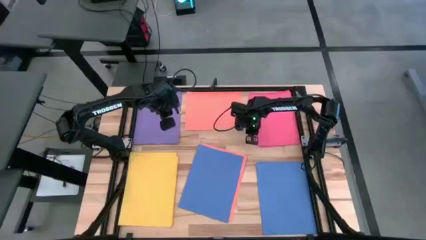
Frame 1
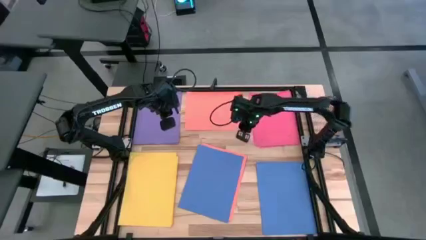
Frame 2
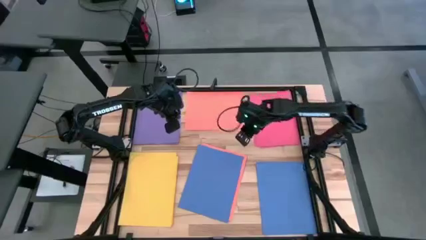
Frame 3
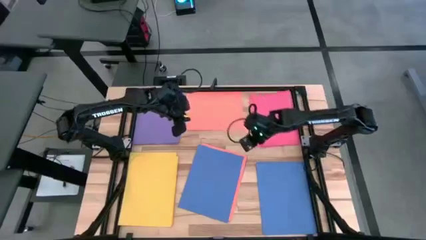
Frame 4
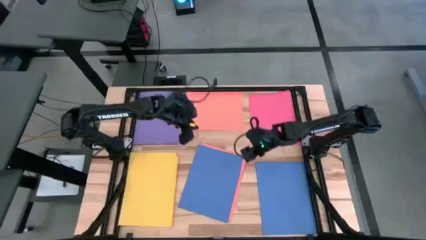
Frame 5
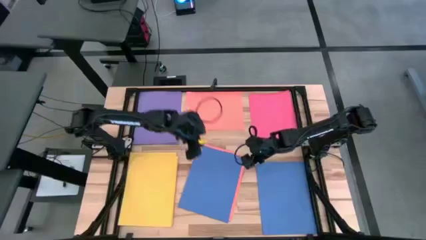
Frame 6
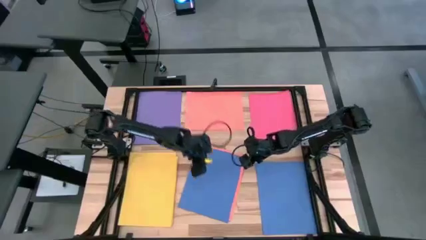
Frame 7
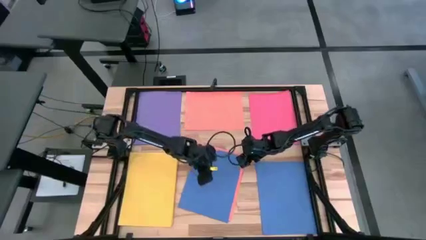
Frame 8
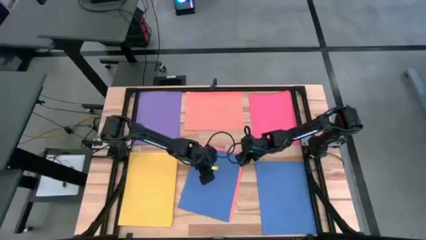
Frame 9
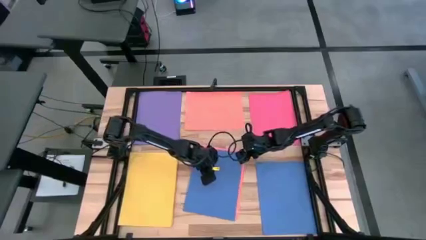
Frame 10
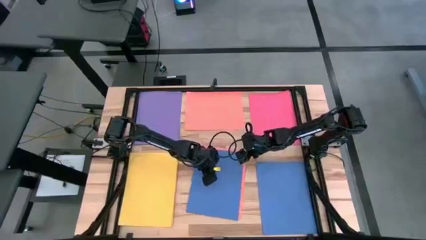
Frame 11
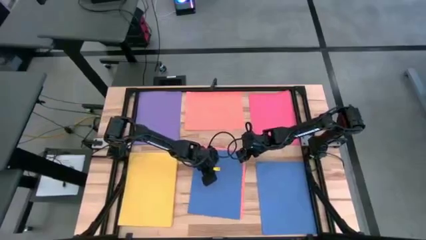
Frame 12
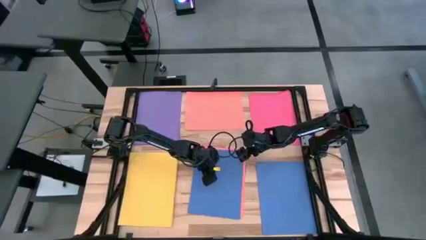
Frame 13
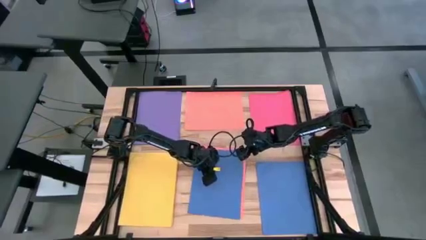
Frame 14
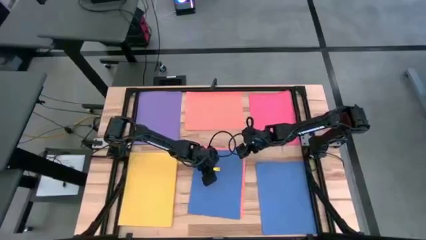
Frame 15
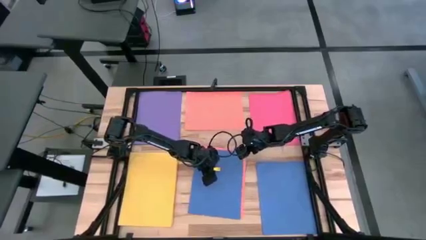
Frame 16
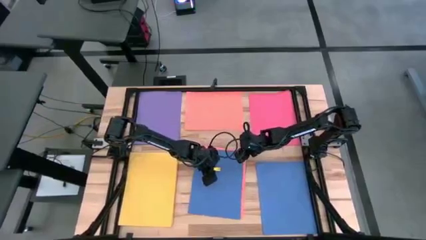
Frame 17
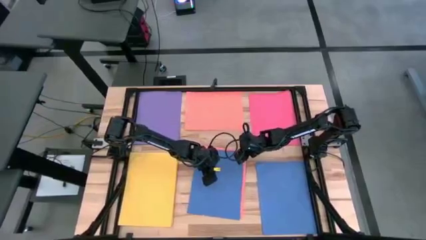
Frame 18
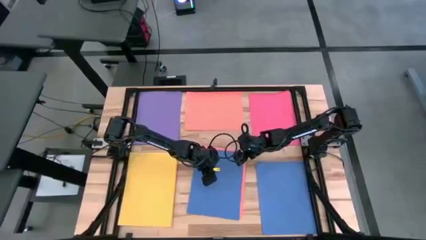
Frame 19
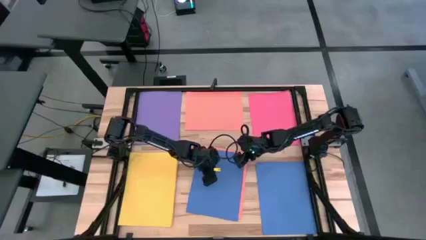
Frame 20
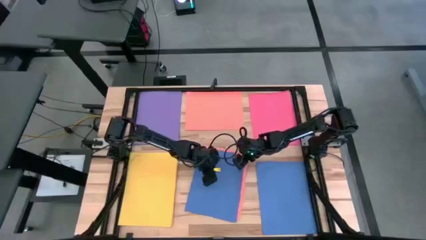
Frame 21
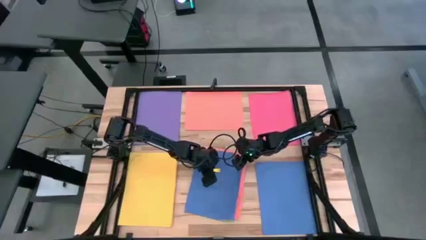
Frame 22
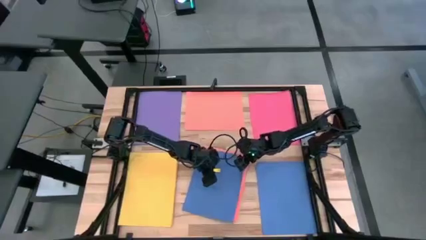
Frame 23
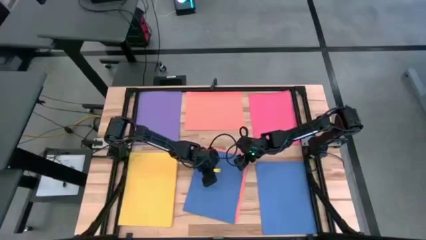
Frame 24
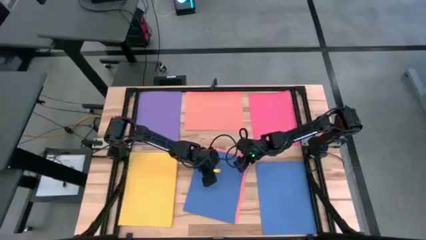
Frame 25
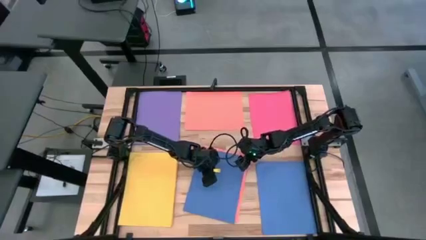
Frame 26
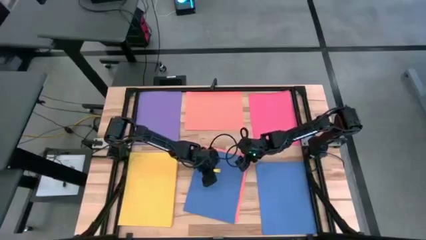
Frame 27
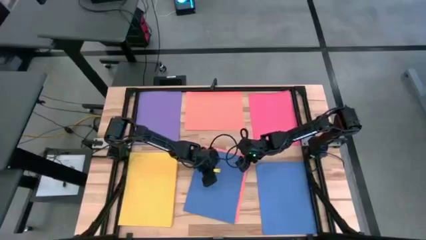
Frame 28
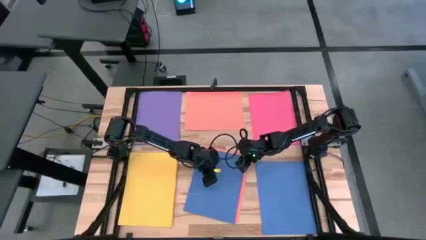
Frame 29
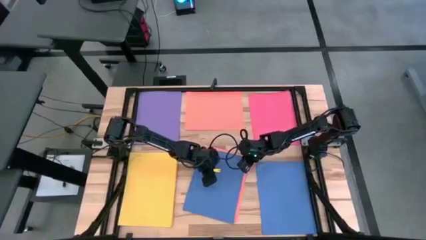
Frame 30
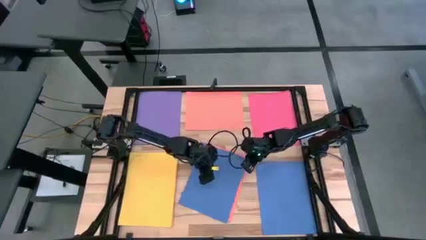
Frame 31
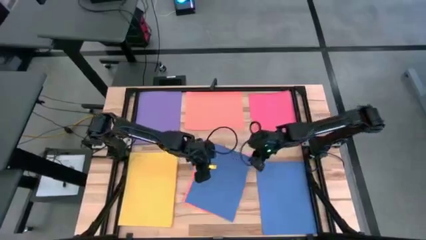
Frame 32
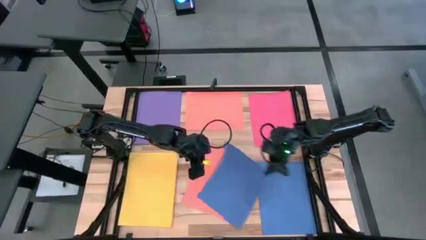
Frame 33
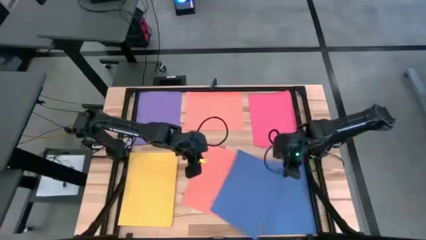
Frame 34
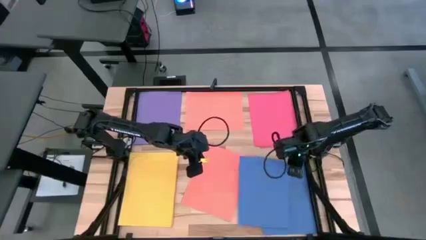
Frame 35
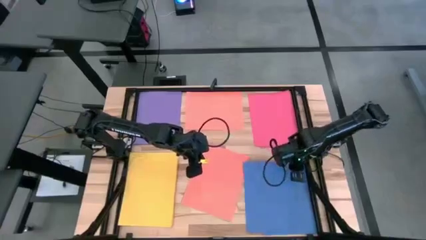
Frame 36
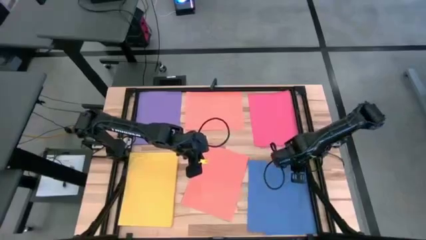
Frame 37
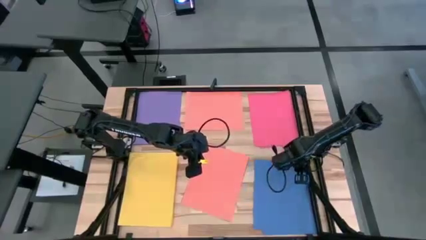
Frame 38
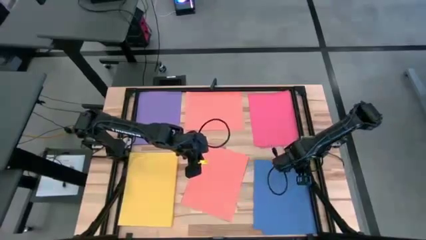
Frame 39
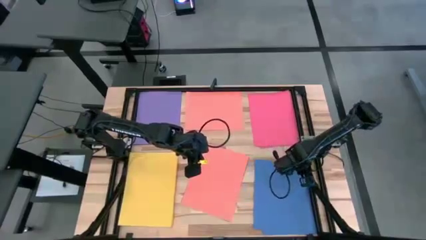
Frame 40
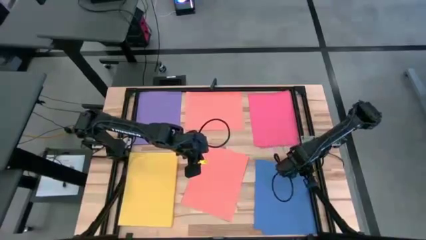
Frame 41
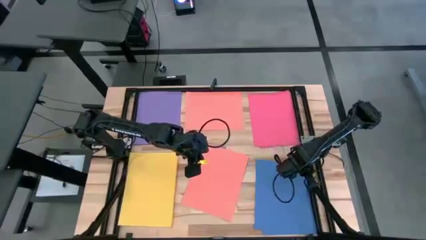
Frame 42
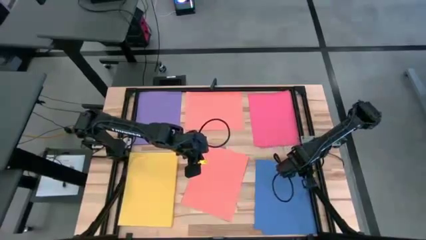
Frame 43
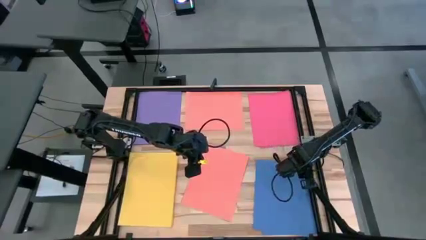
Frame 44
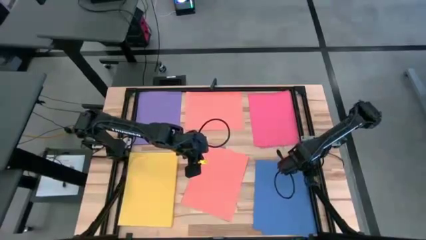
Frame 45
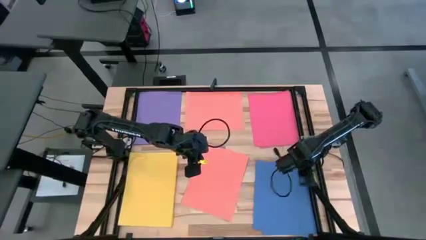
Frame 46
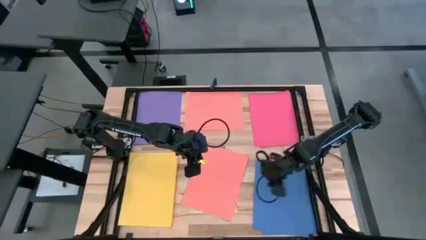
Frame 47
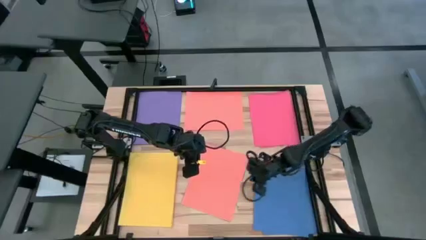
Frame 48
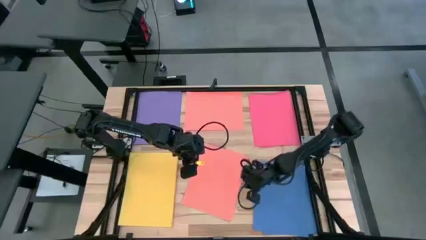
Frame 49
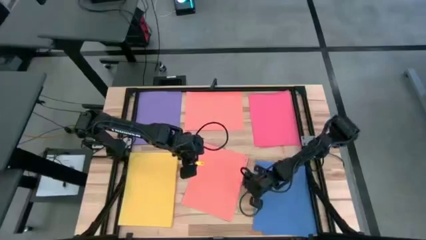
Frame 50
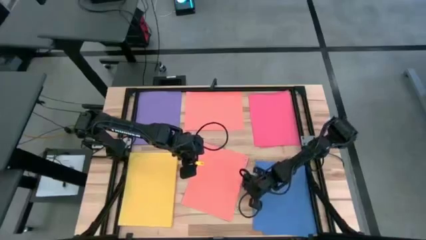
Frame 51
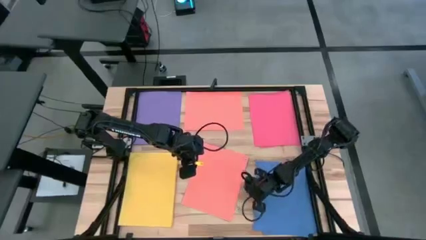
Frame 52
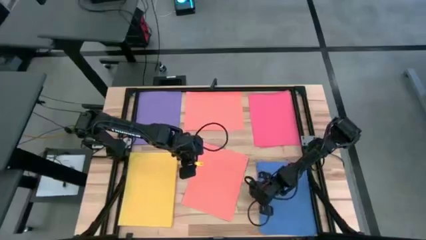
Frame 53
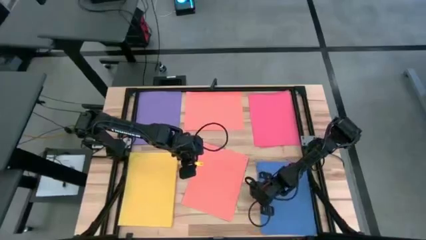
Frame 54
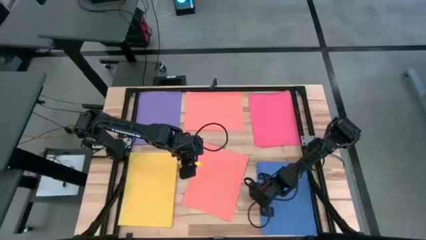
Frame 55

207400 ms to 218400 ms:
Task: Organize paper
Stack the blue paper on top of the other blue paper

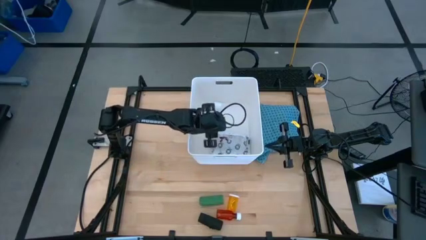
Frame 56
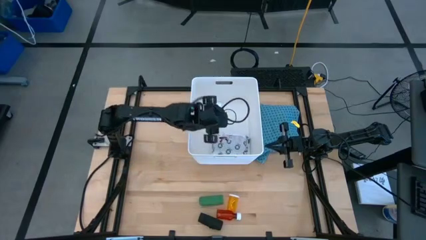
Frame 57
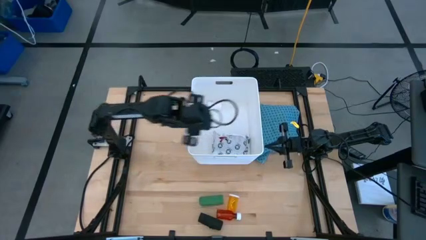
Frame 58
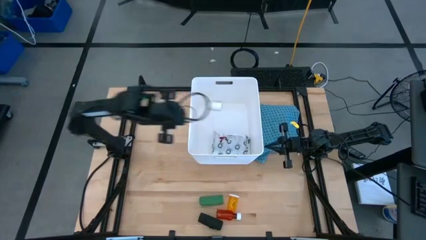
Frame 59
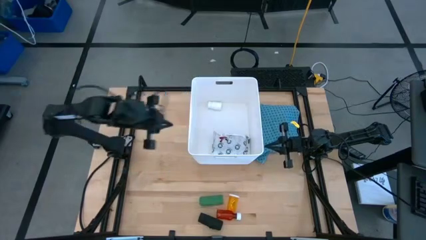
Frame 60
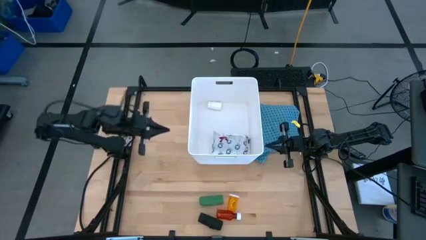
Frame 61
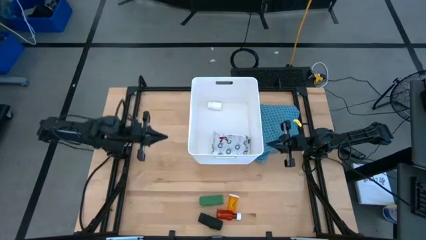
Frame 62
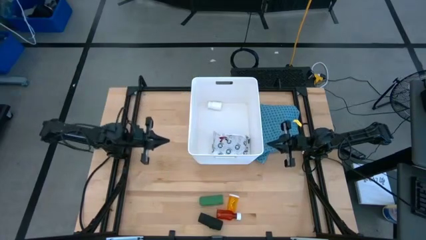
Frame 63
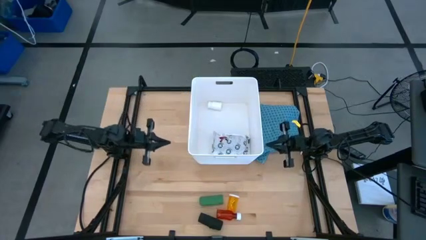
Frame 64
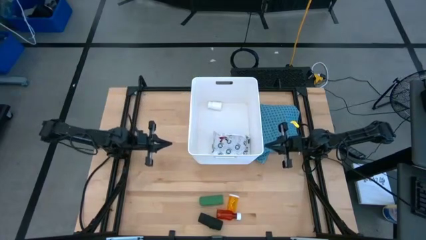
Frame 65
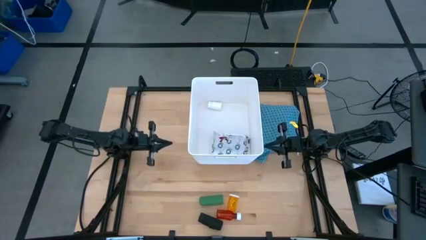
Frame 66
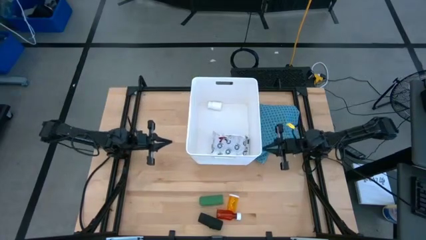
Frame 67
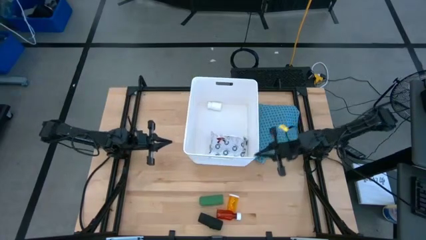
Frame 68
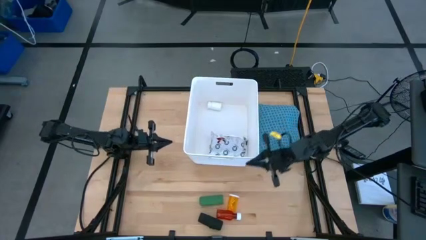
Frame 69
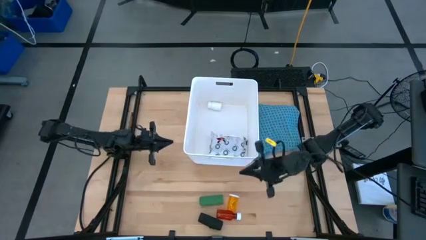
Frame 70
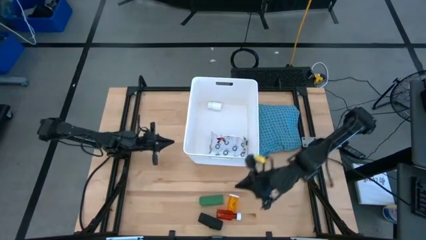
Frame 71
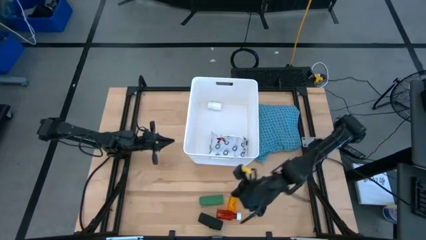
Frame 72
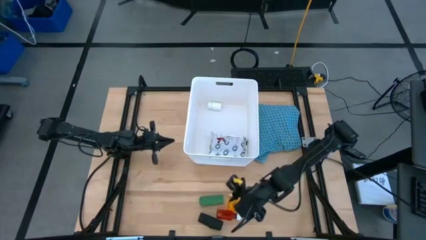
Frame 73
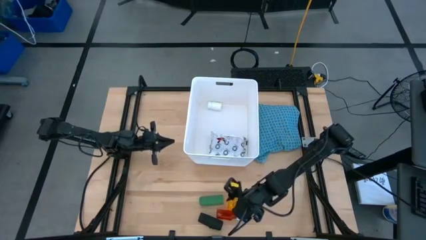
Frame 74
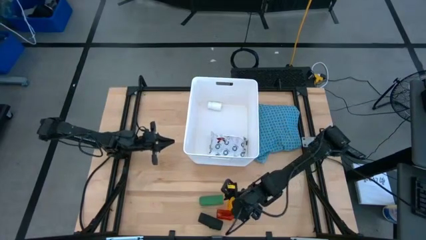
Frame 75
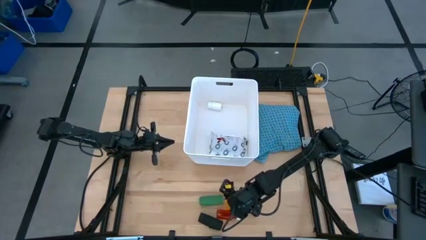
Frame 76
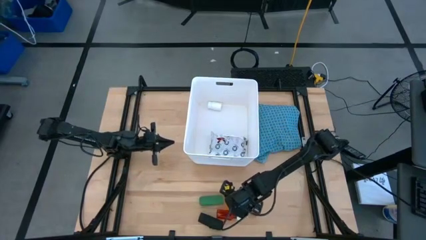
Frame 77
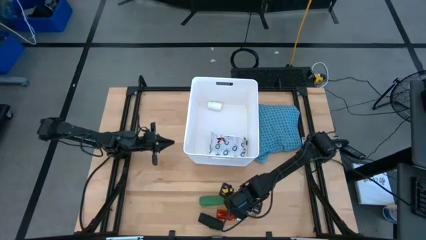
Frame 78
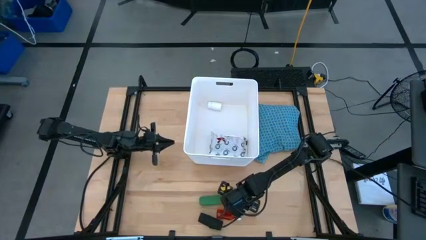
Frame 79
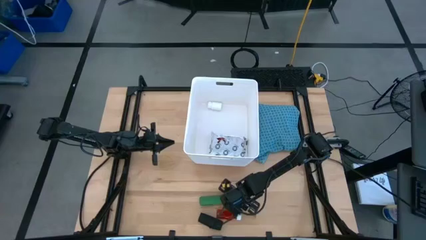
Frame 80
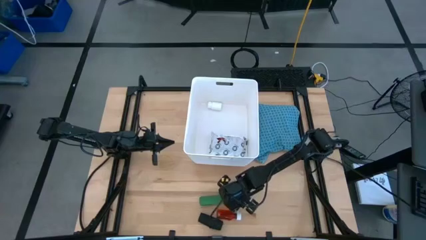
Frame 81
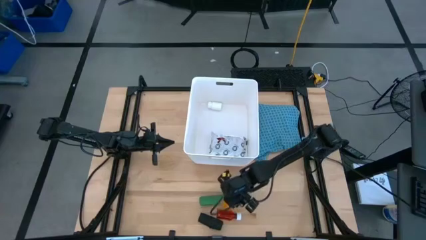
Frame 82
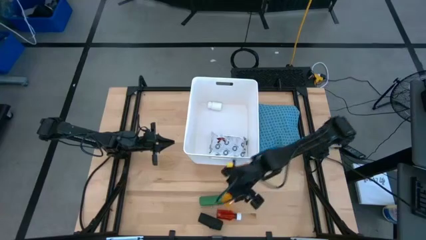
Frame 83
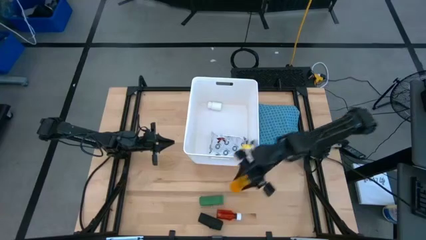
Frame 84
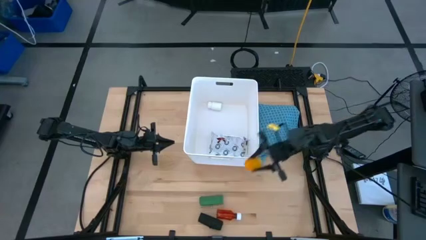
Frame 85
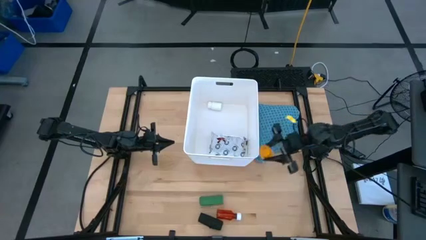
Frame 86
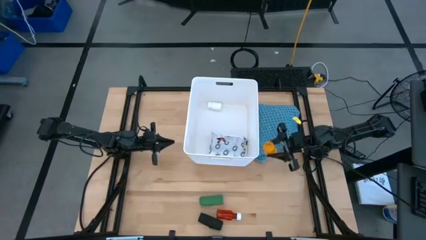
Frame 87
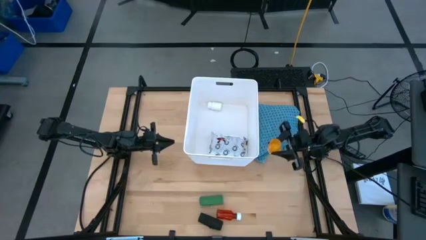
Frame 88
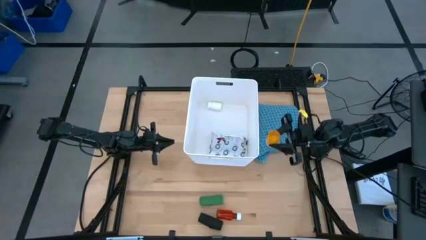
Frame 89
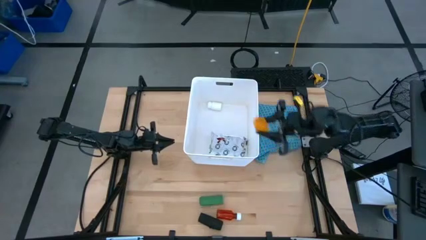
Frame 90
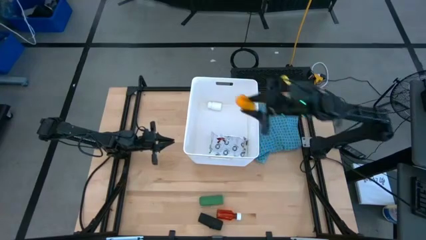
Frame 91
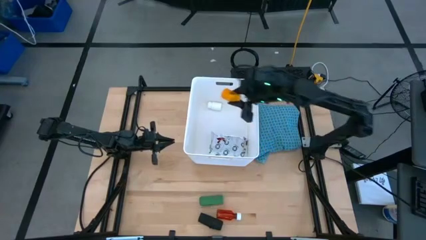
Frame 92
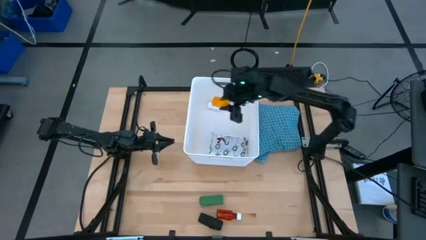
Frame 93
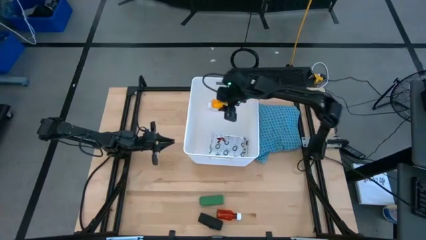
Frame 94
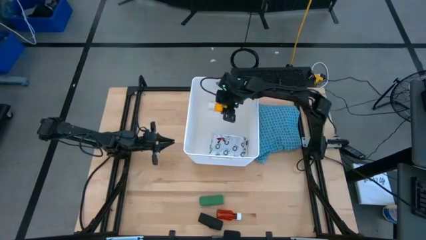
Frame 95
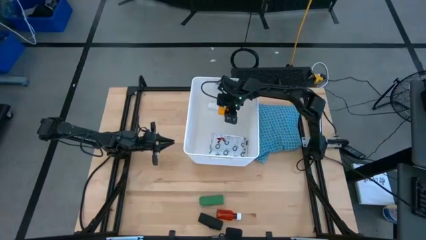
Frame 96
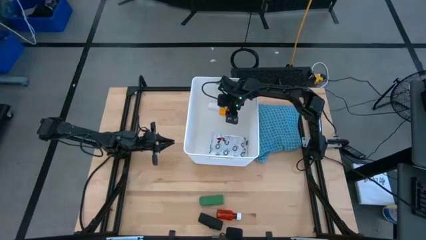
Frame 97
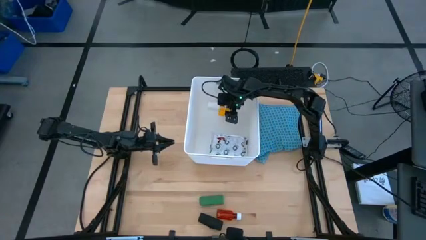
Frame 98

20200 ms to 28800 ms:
Task: Pick & place medical supplies in basket/bin
Put the orange pill bottle into the white bin
